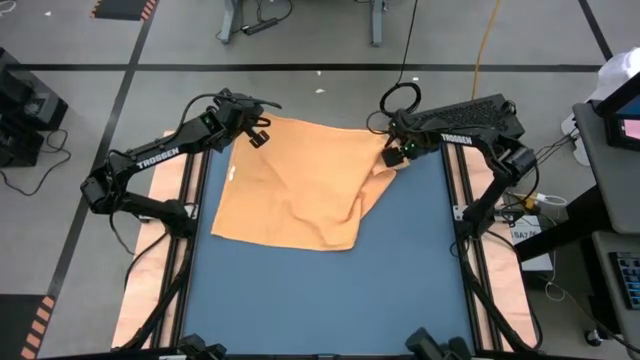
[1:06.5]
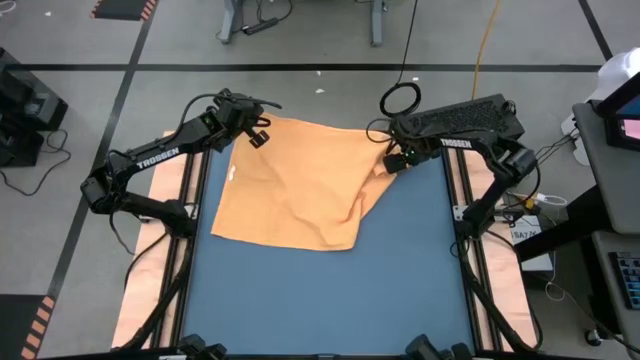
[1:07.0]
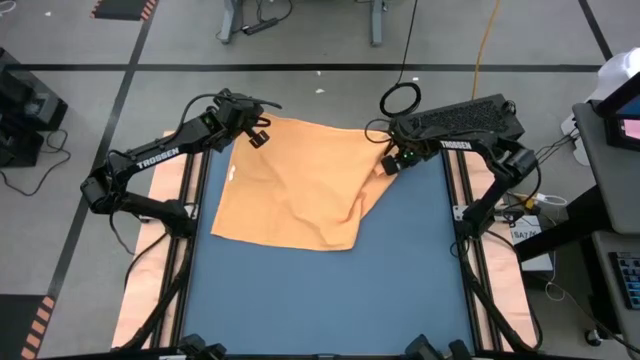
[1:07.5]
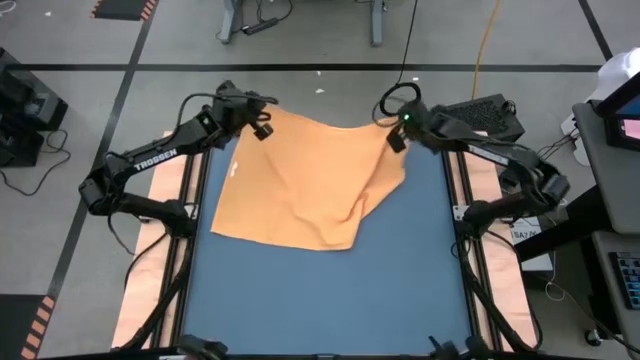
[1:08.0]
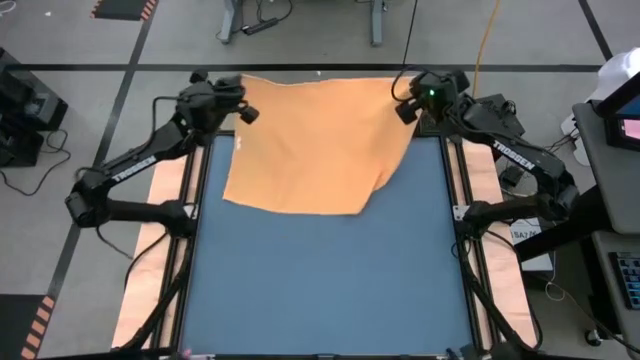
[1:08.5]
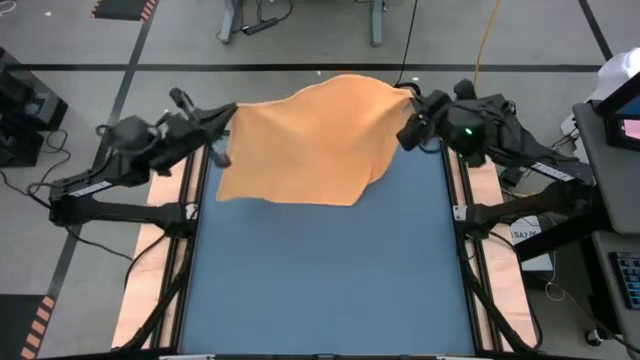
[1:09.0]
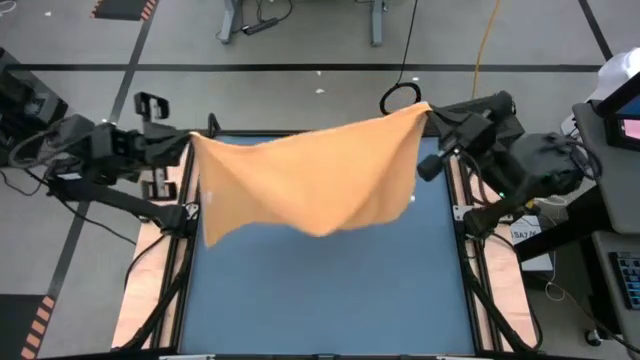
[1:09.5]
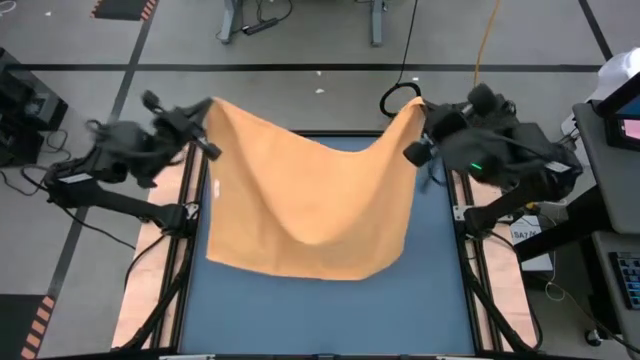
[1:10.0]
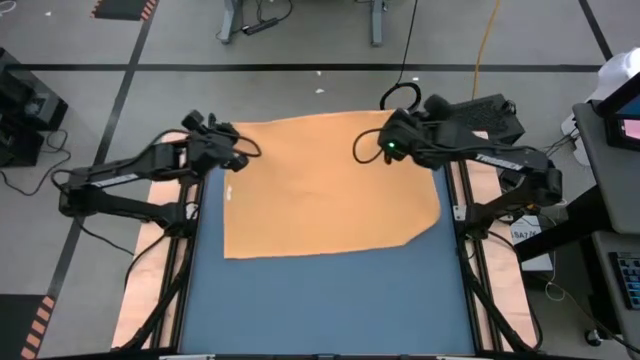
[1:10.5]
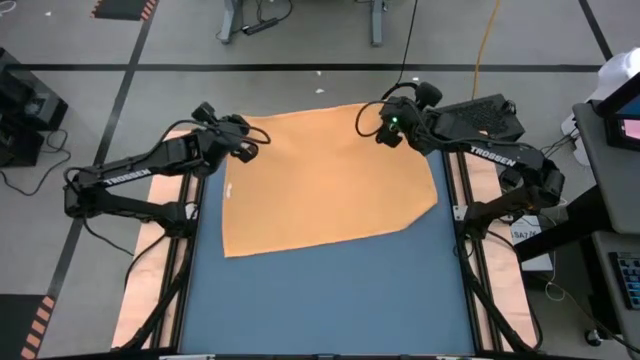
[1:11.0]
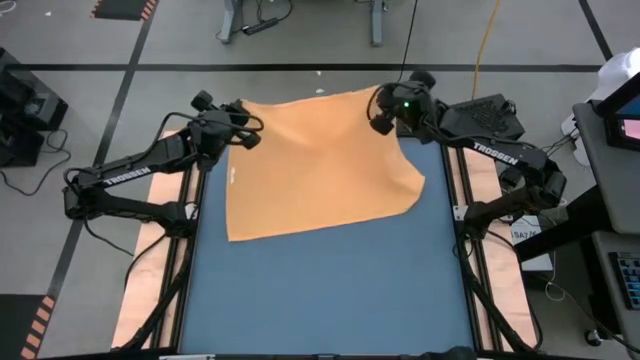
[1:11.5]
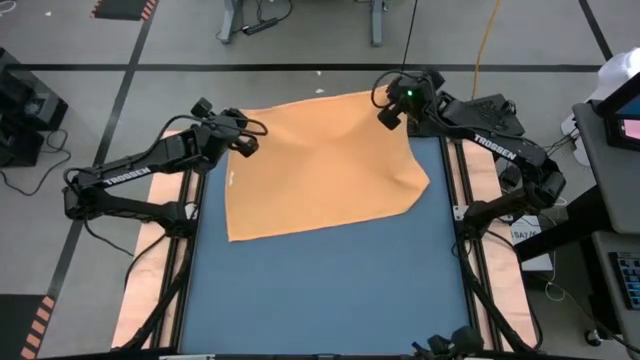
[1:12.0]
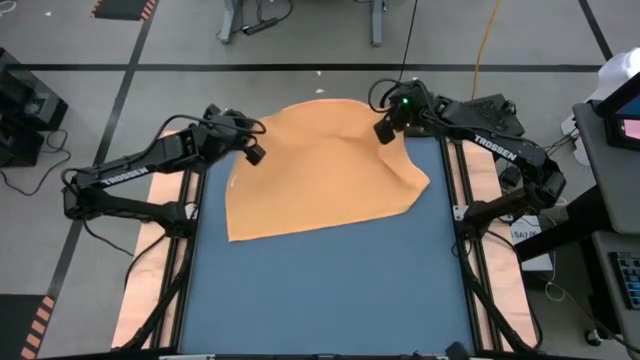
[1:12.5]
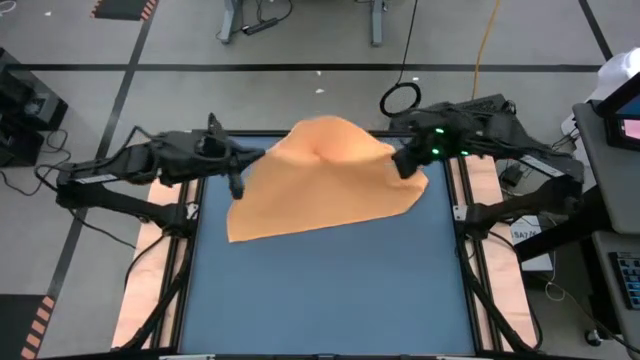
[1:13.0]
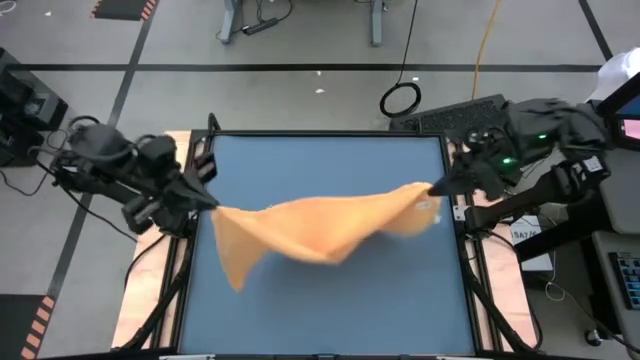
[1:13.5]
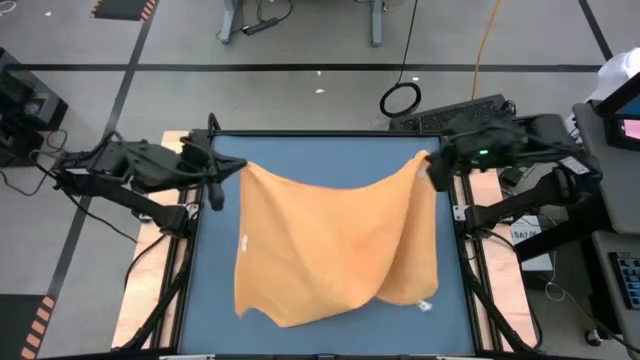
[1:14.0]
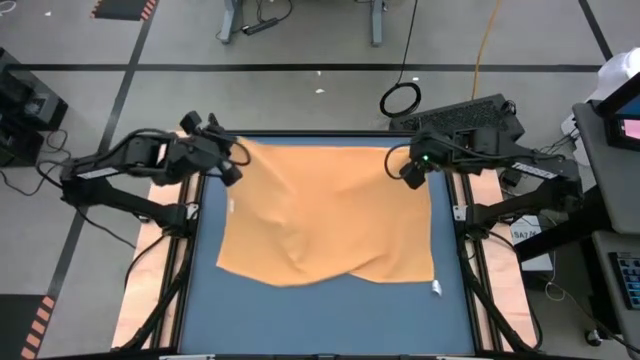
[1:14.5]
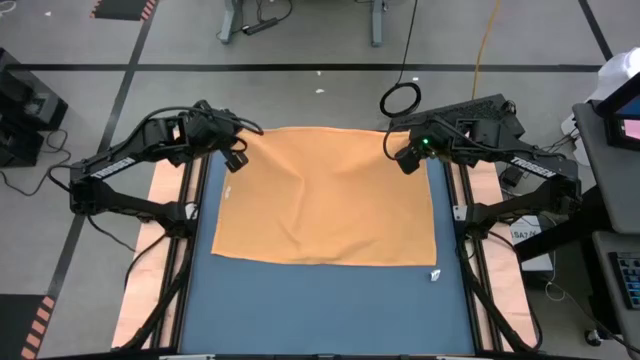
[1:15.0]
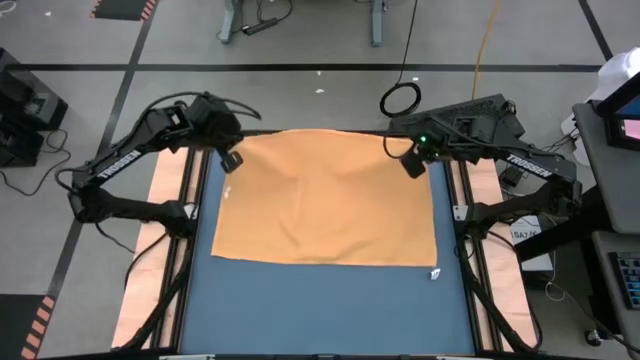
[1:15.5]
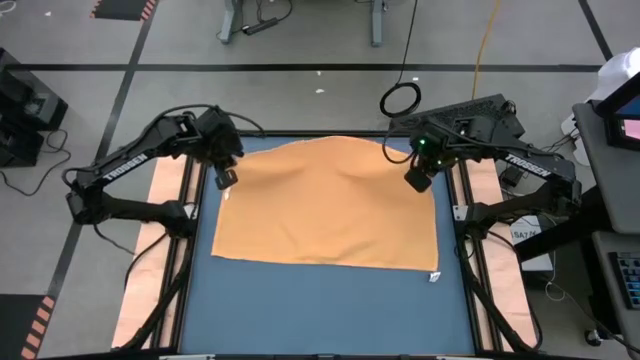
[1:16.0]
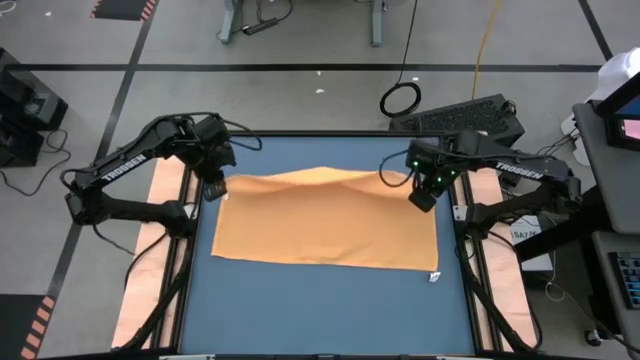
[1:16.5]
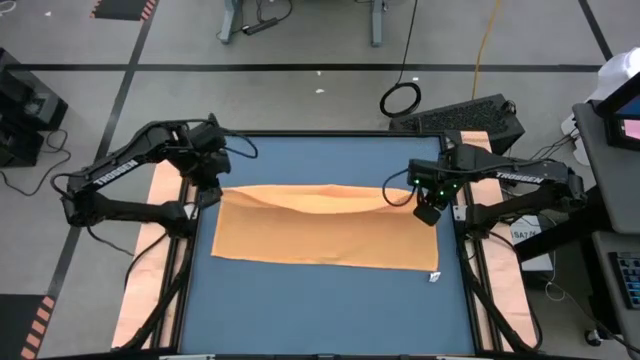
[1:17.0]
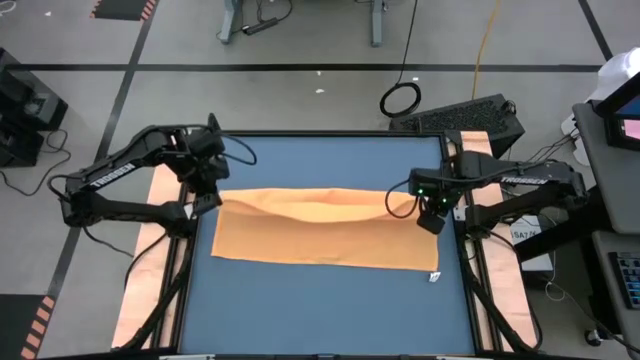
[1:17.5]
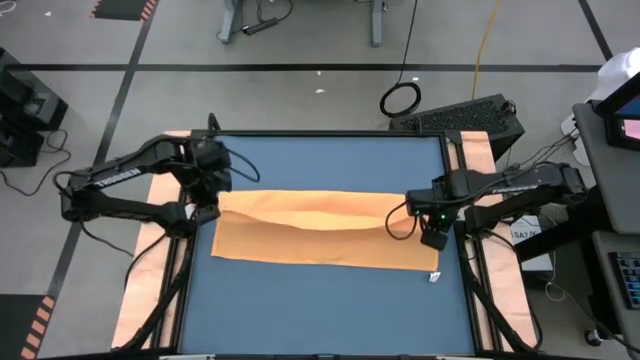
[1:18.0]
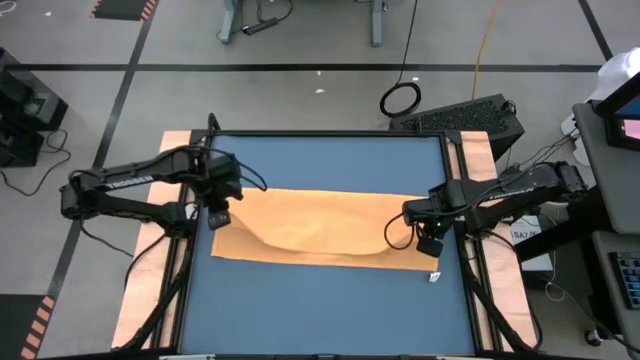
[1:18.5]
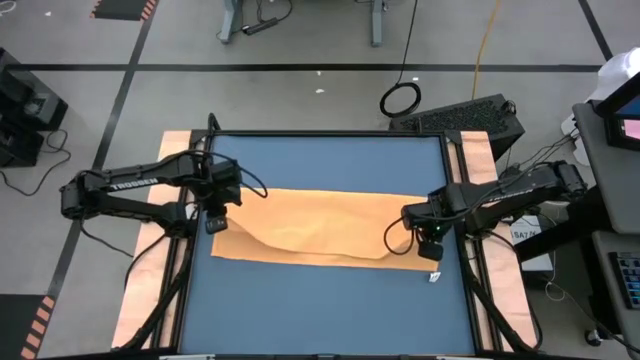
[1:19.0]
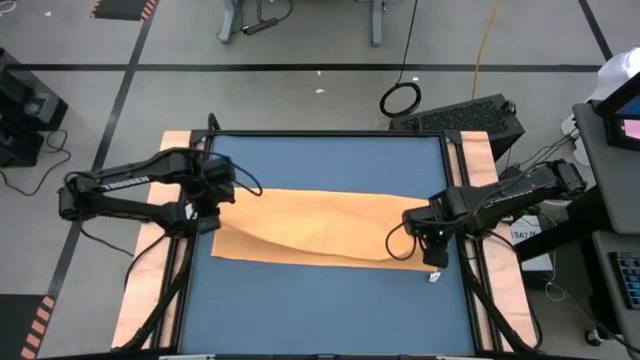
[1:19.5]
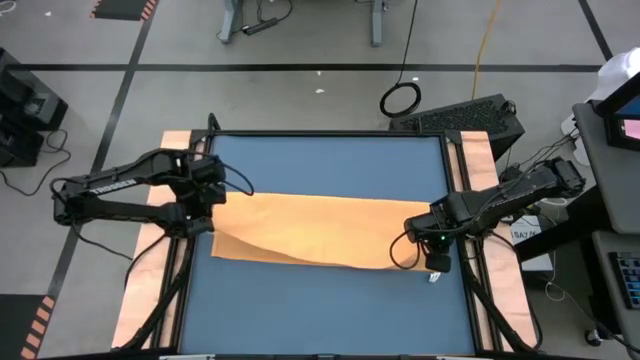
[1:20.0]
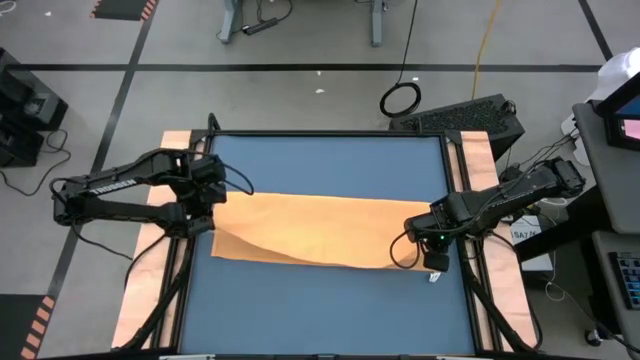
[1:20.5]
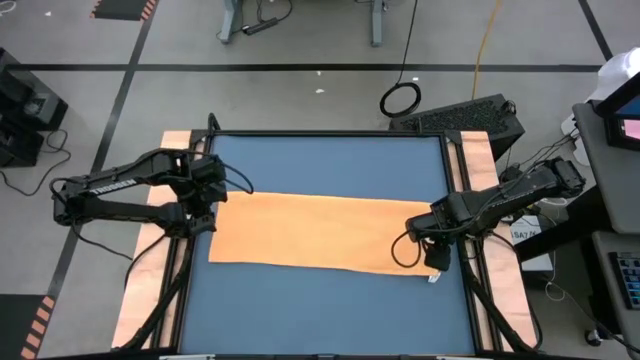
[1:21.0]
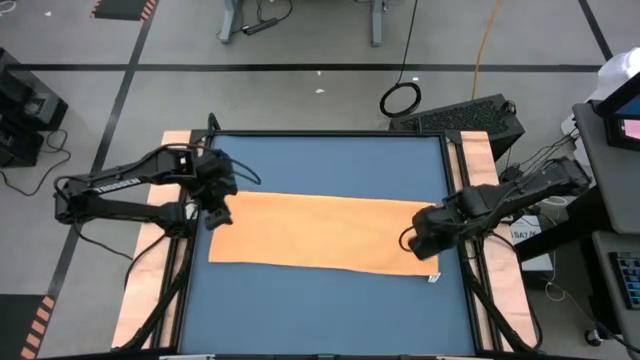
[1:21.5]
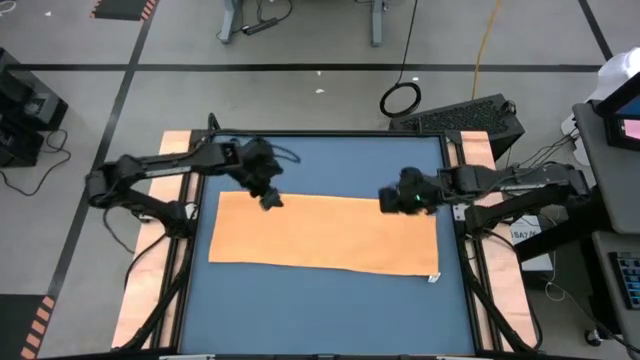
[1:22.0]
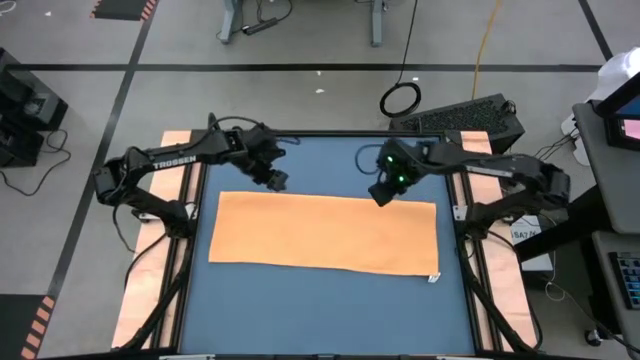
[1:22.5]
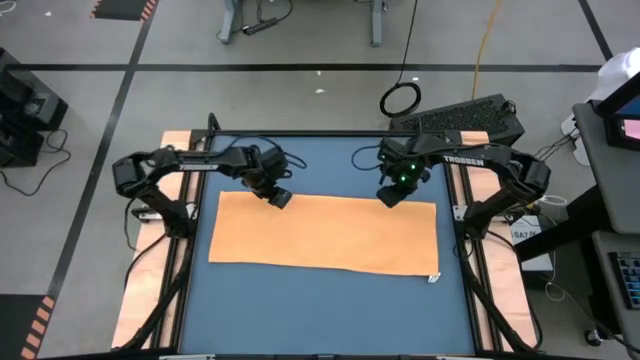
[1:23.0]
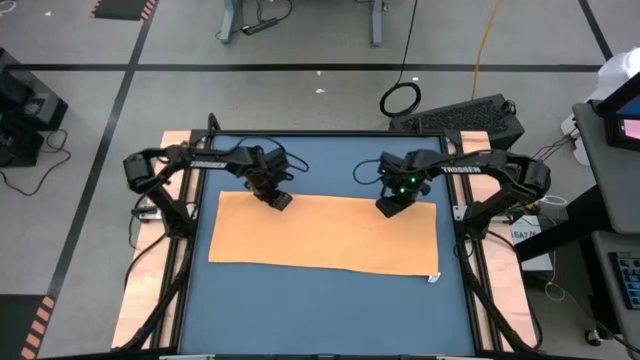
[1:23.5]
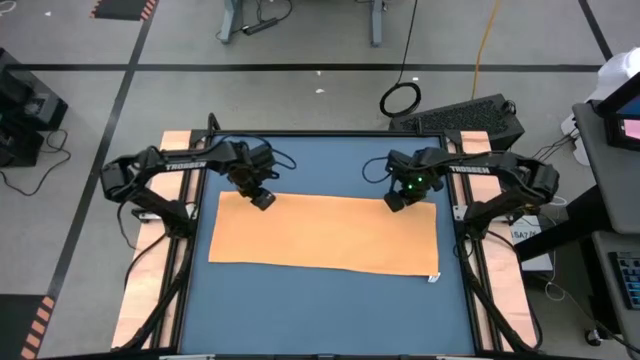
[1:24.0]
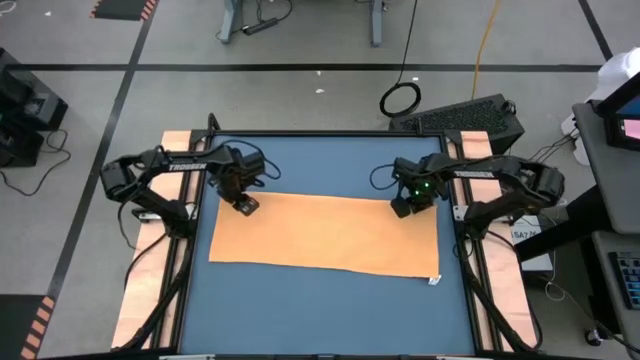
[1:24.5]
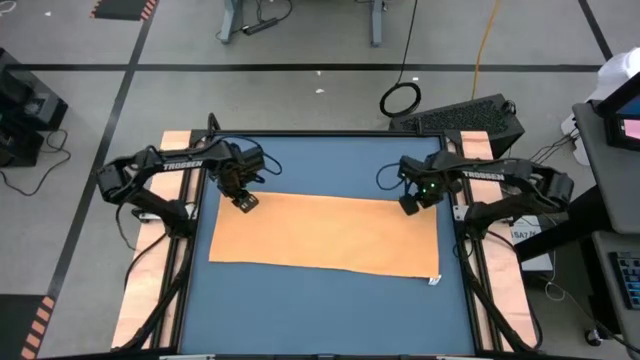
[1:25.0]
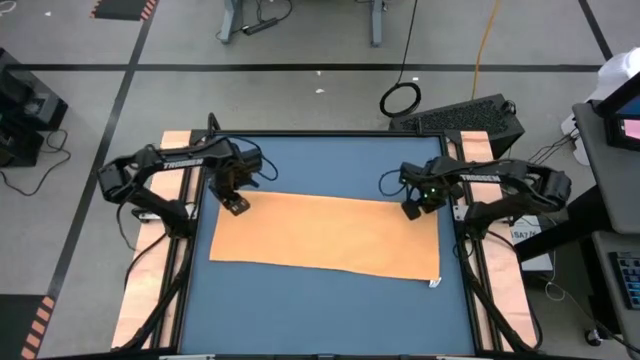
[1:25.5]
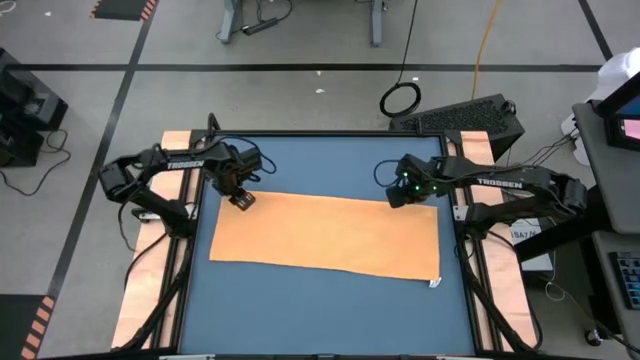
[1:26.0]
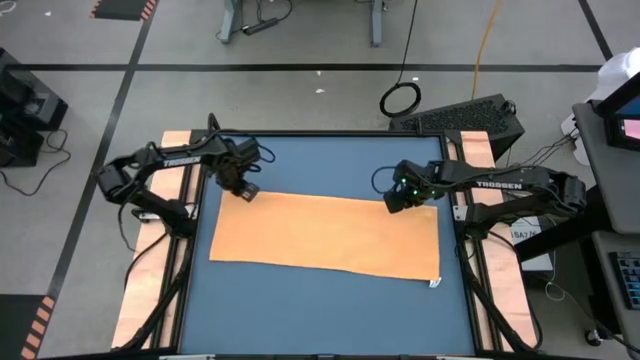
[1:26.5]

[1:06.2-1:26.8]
Task: Roll towel into tight, uniform cylinder
Fold the orange microfiber cloth

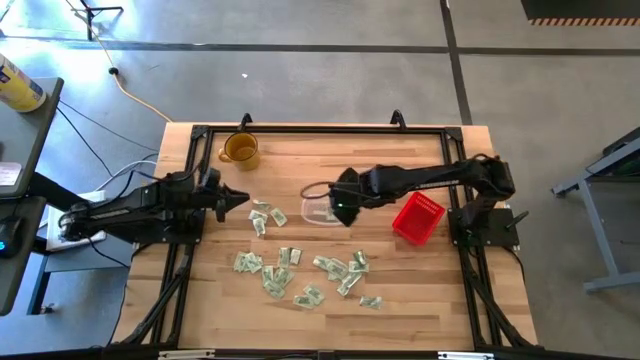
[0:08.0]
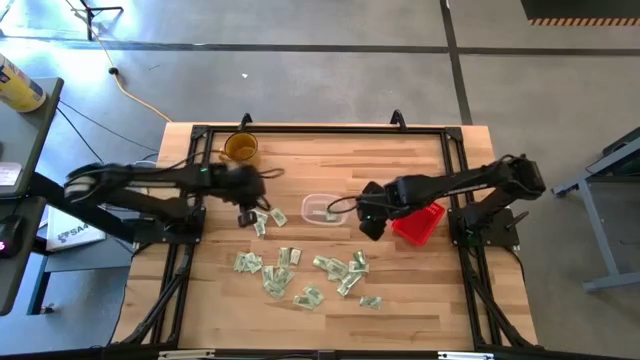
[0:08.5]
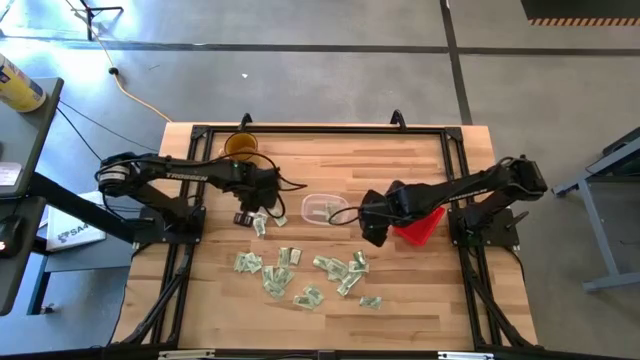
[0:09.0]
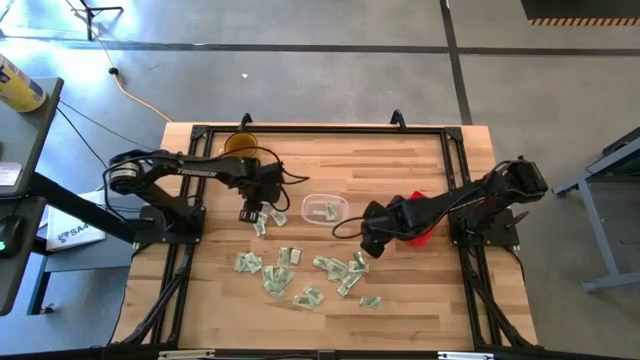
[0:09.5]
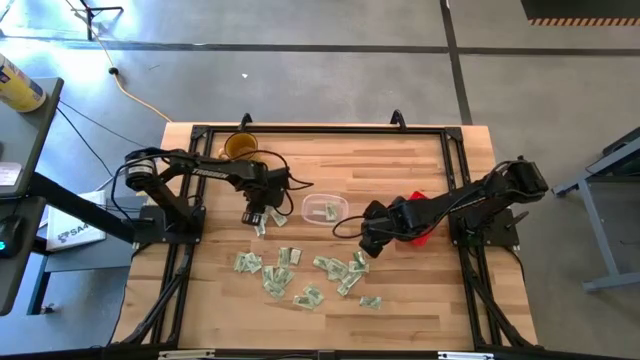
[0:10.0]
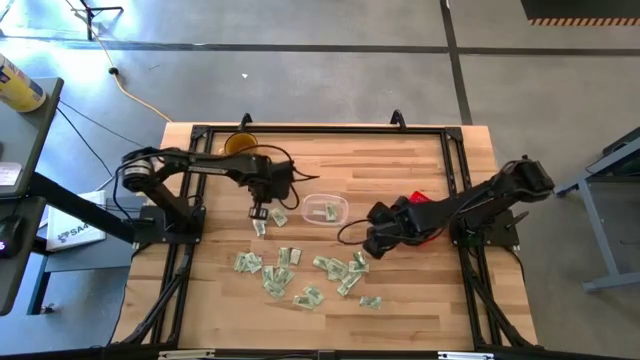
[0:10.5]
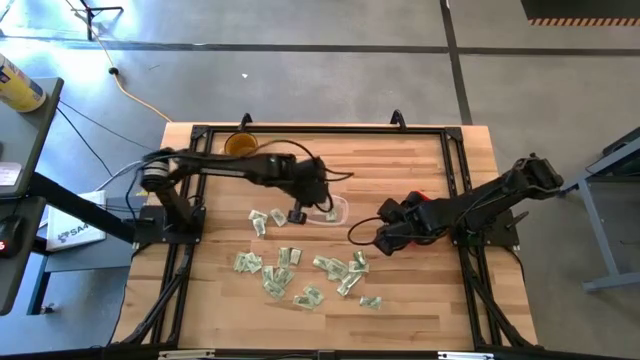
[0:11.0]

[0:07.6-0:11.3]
Task: Pick and place items into bin
Put the white stevia packet into the transparent bin
